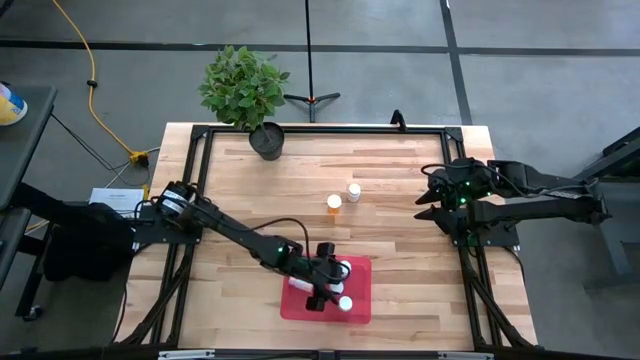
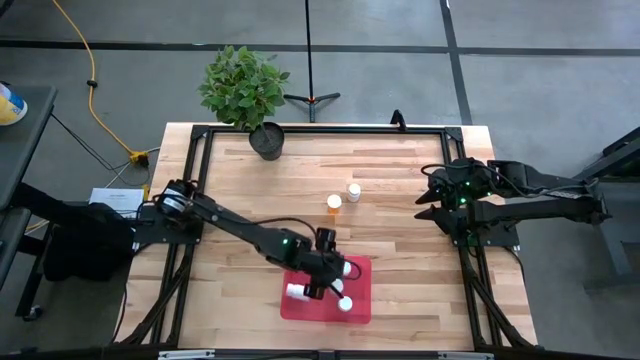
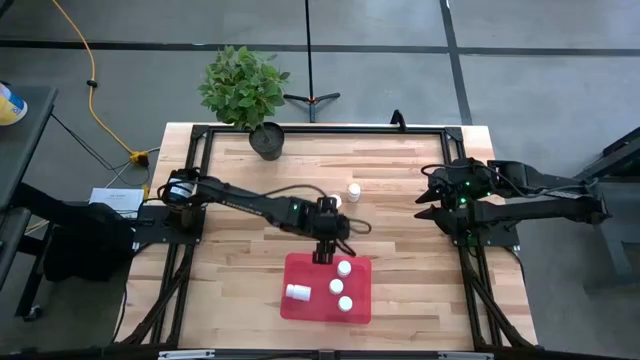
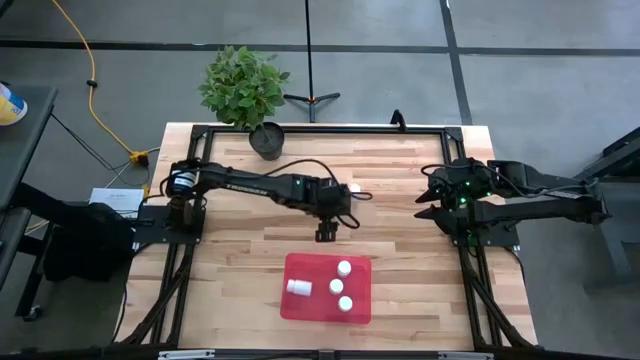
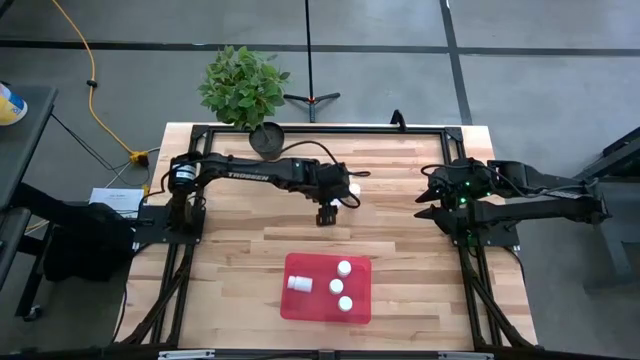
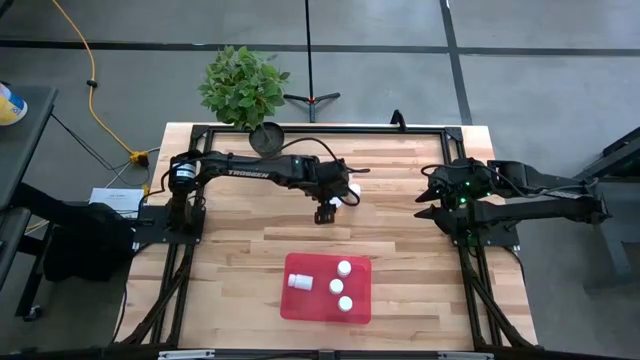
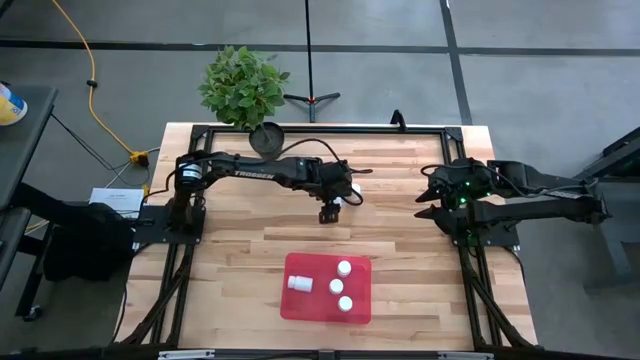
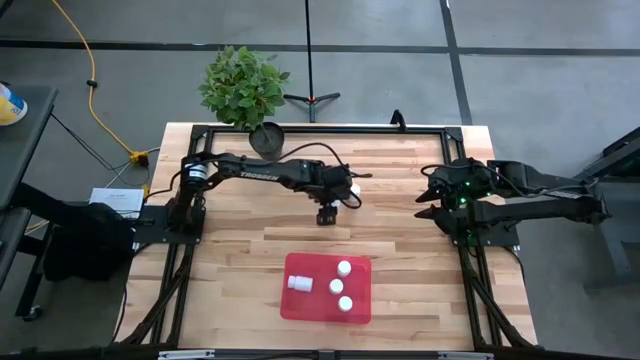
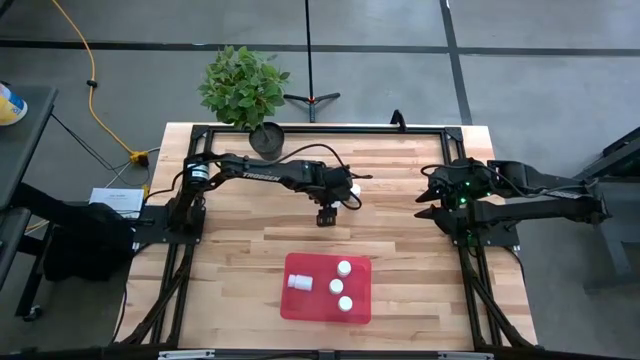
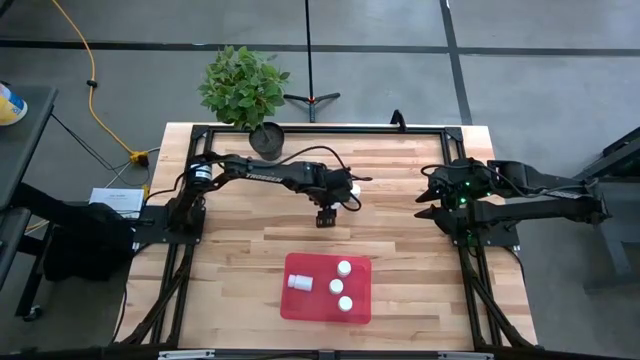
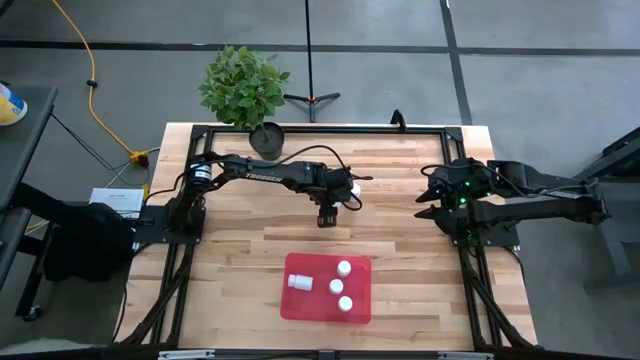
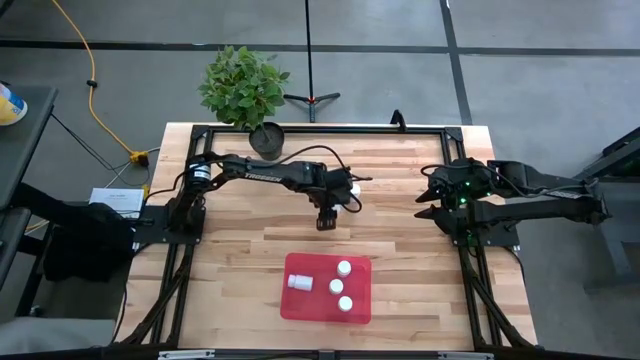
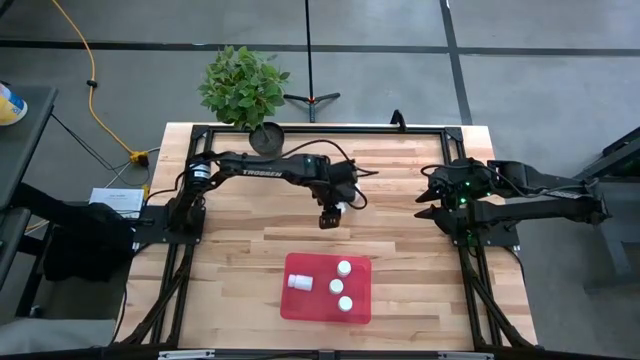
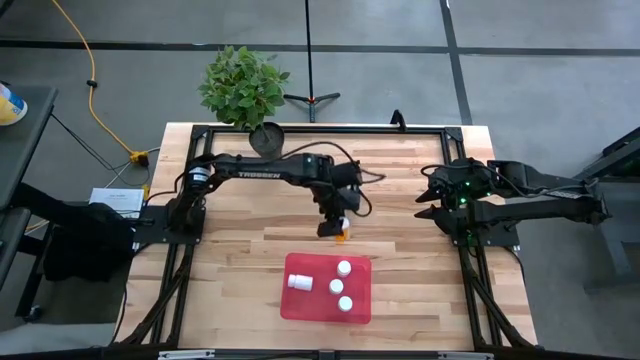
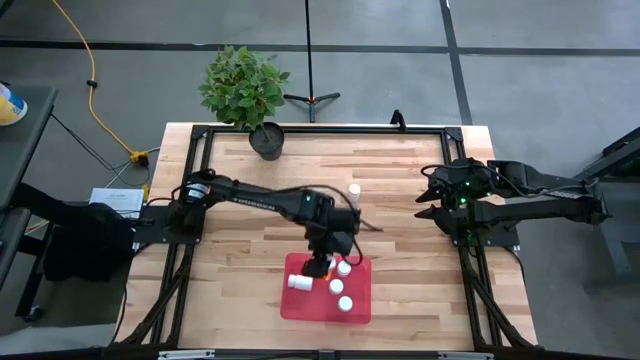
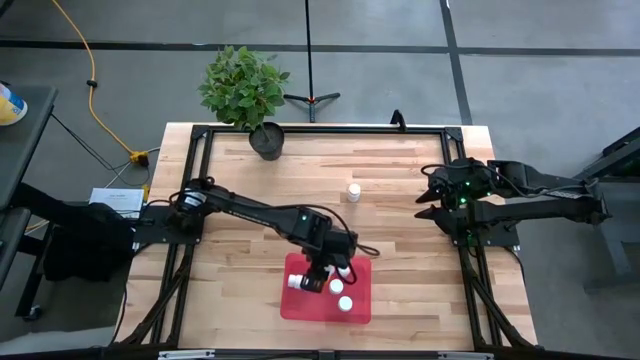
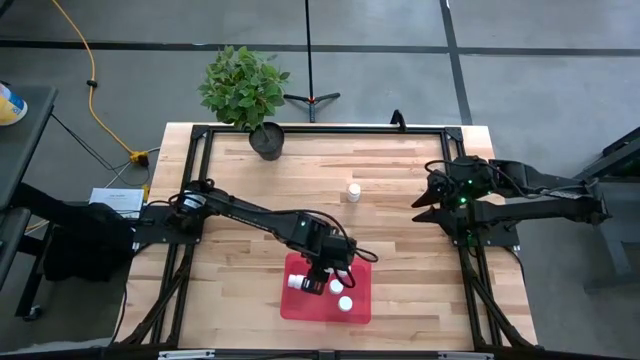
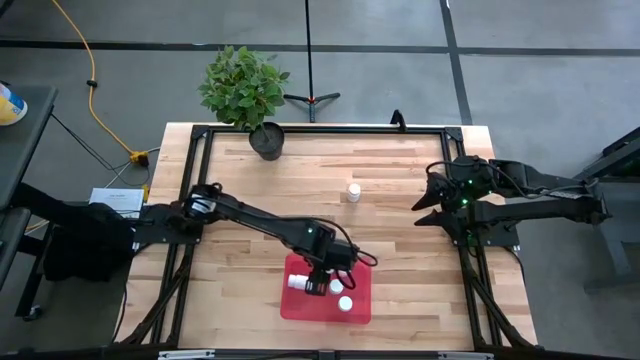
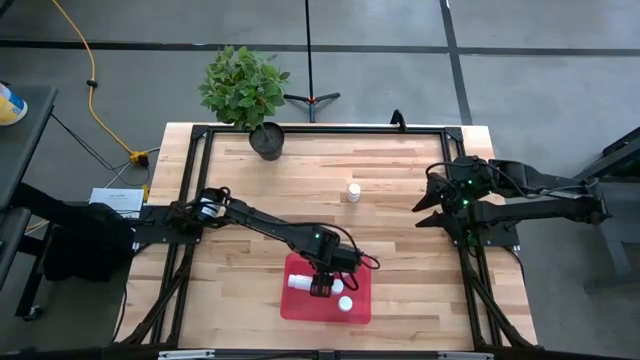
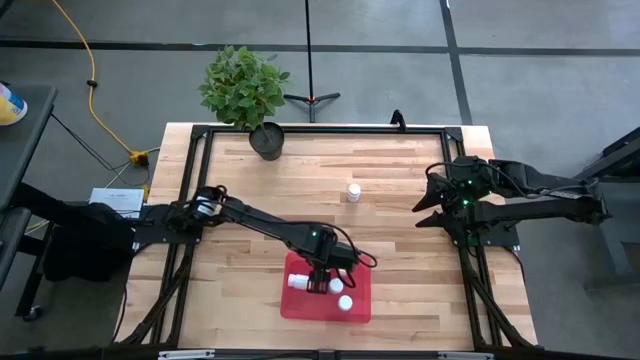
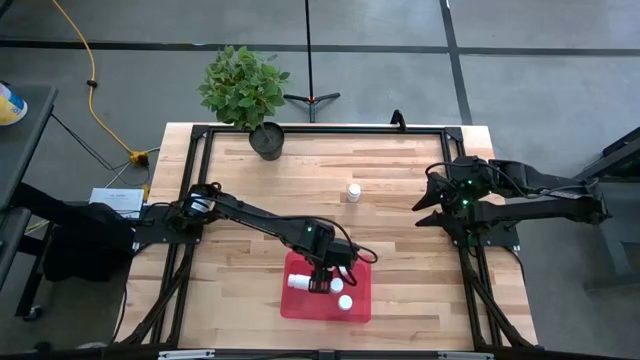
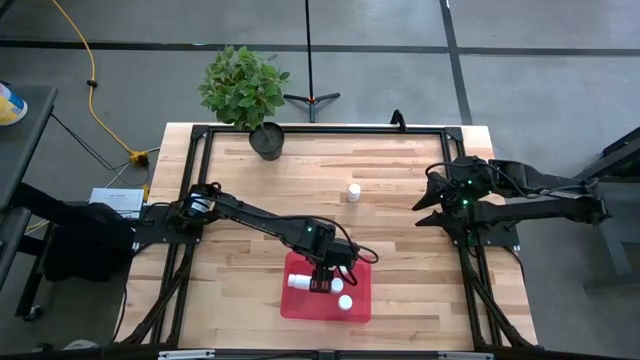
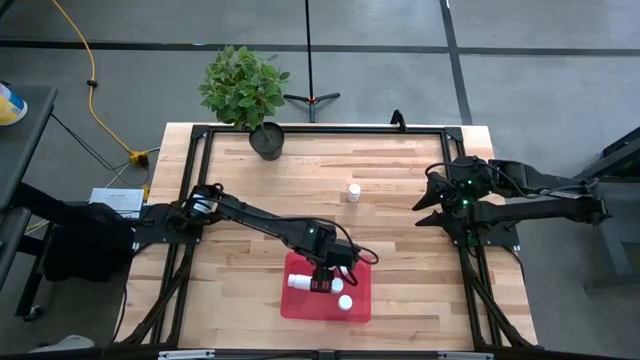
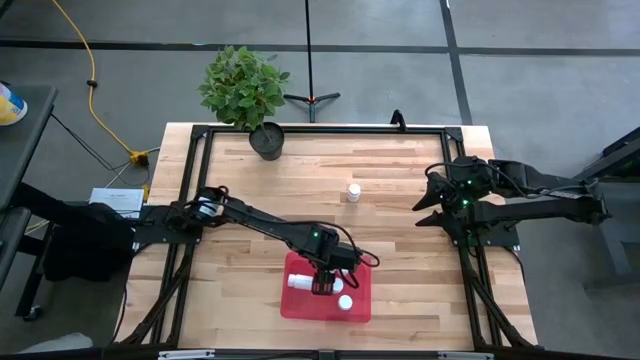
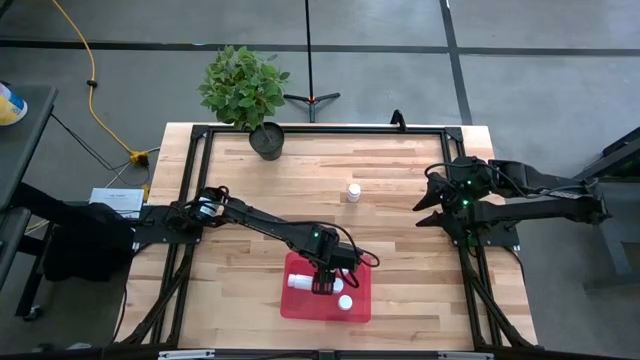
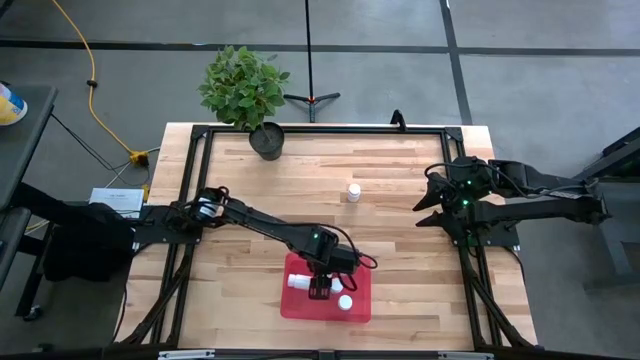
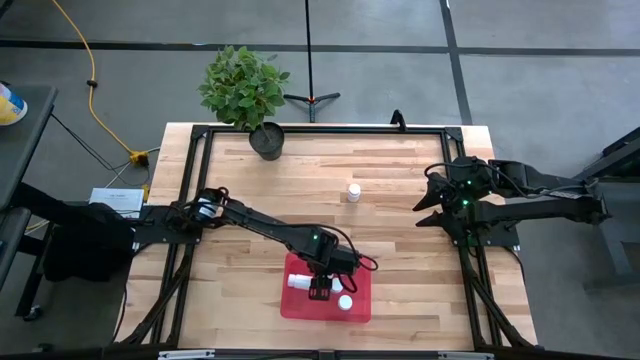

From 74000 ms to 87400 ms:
Task: Pick and place pill bottles into a basket
Put the orange pill bottle into the red bin

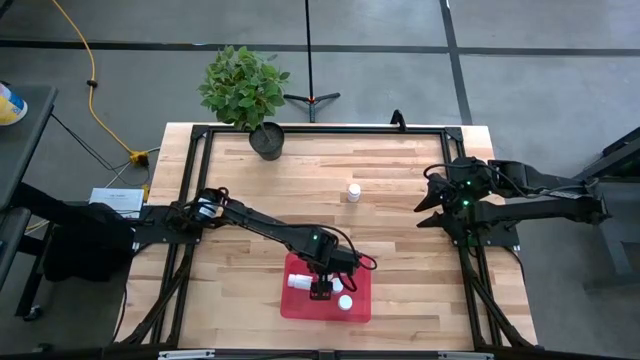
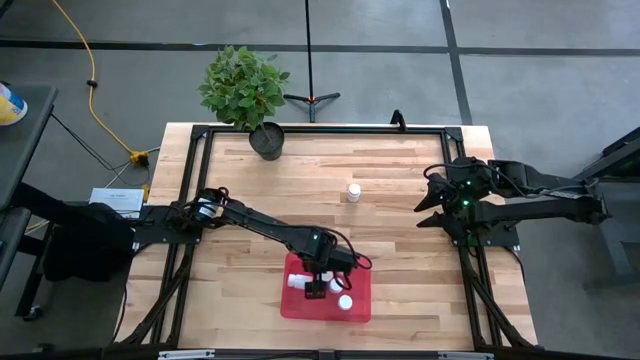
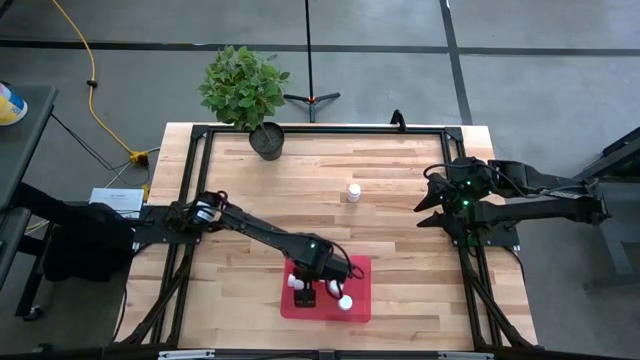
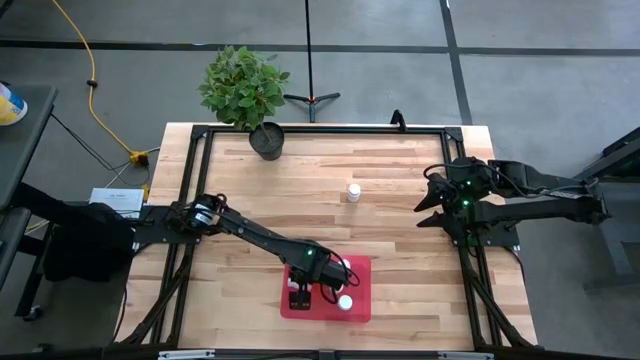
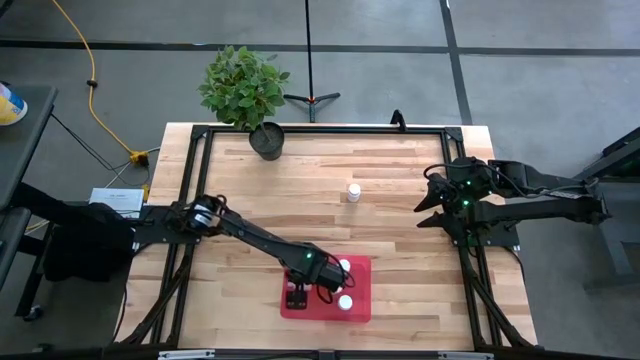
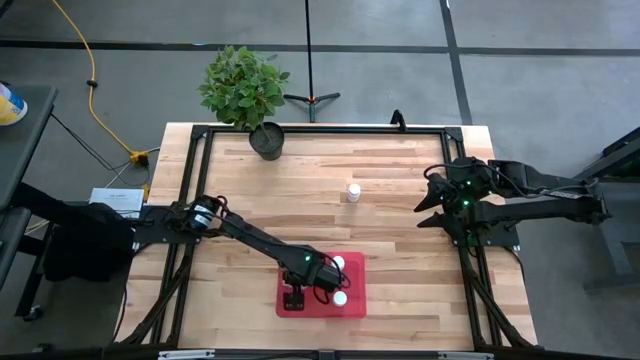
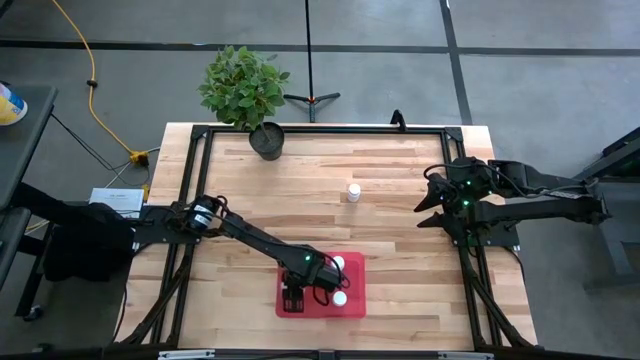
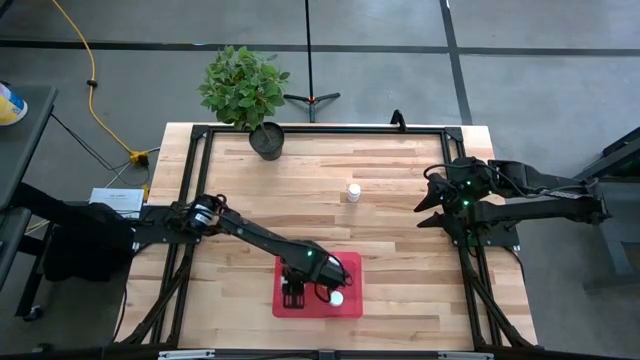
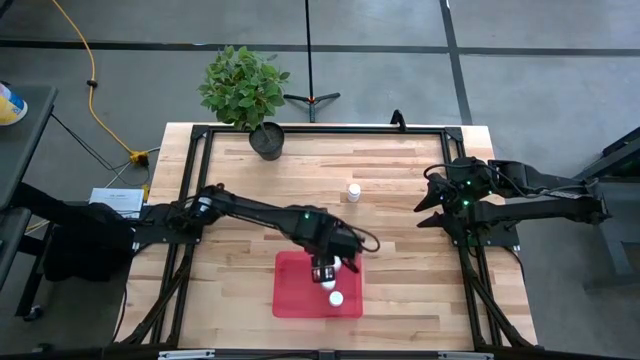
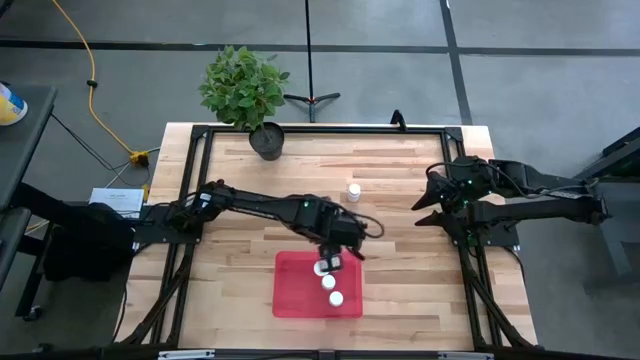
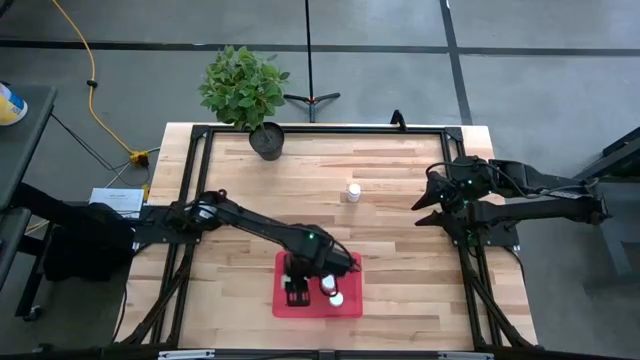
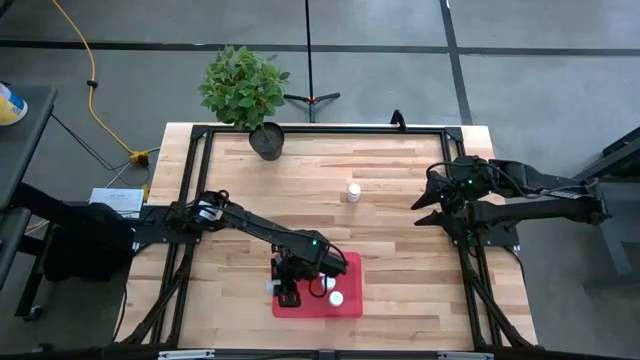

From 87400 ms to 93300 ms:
Put the white pill bottle into the red bin

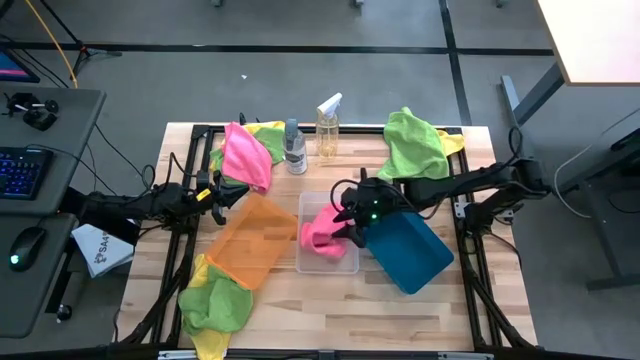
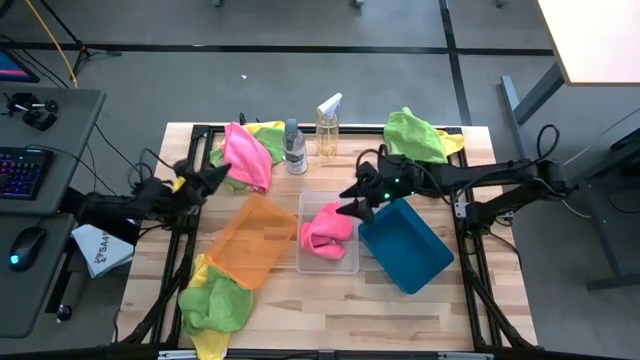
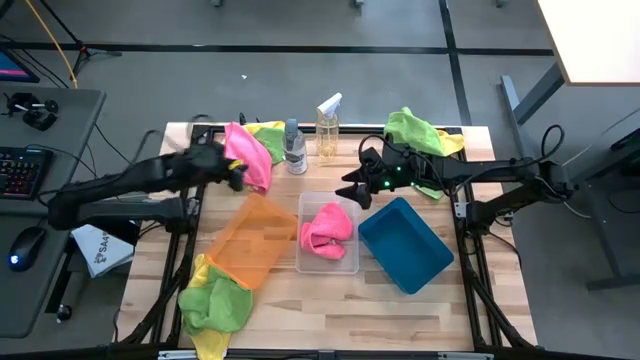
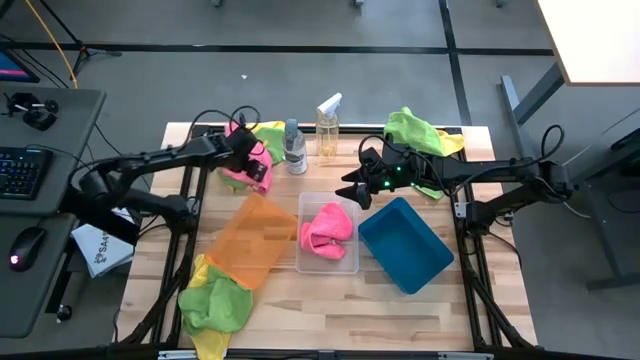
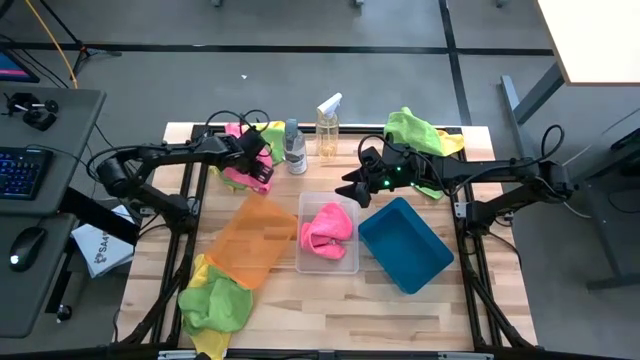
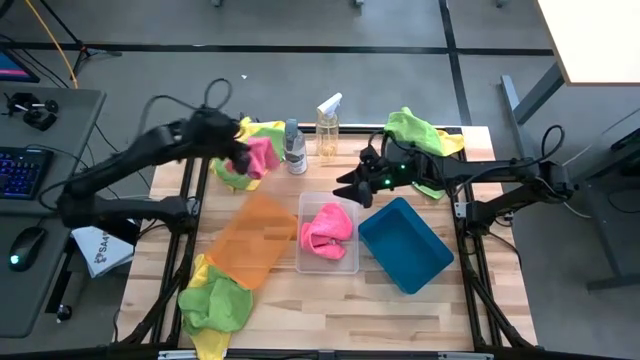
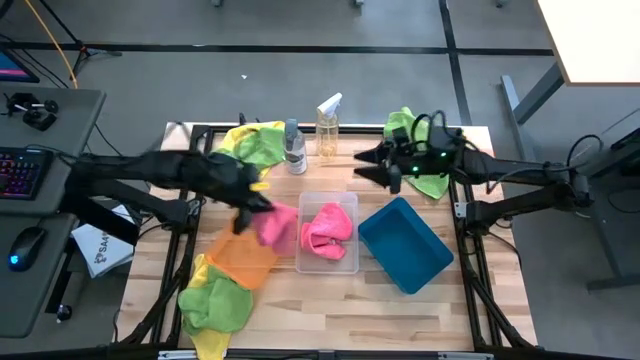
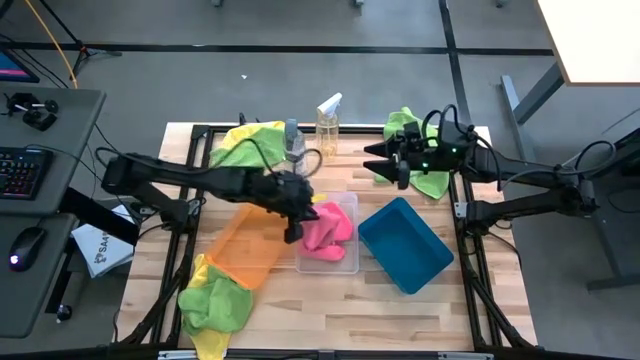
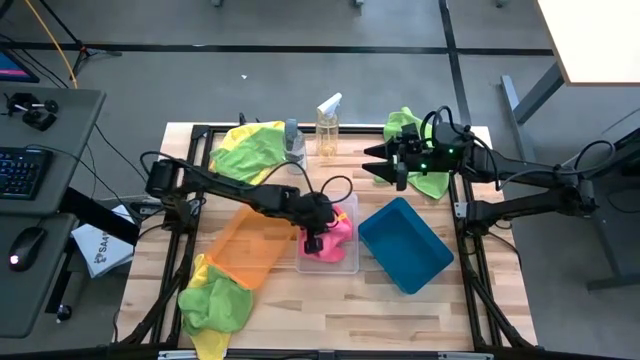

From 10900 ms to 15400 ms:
Task: Sort microfiber towel by color & place in baskets
Put the pink microfiber towel into the white bin
